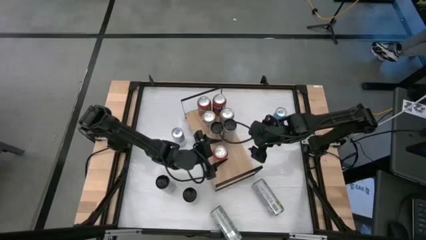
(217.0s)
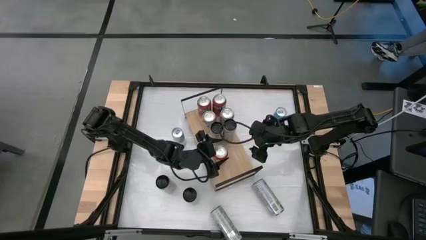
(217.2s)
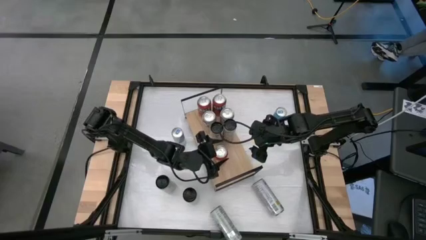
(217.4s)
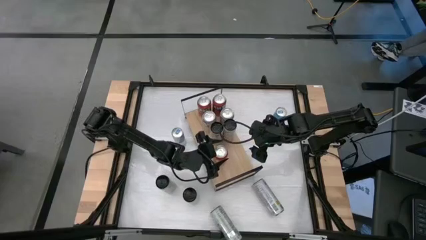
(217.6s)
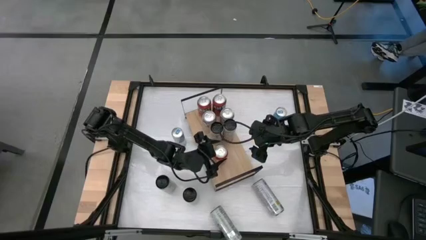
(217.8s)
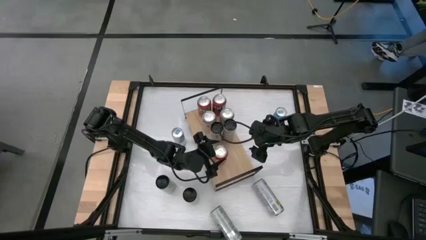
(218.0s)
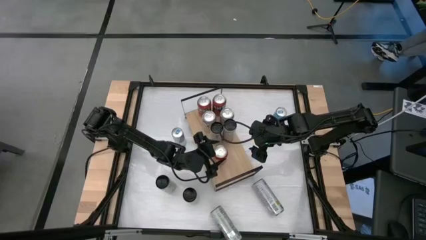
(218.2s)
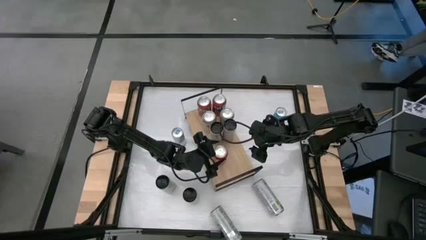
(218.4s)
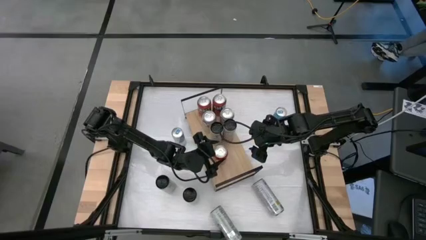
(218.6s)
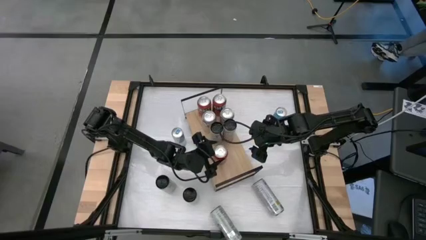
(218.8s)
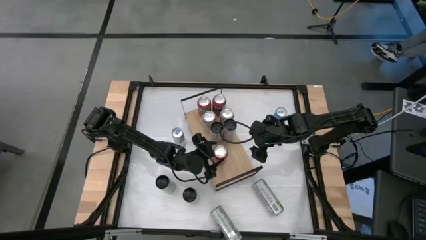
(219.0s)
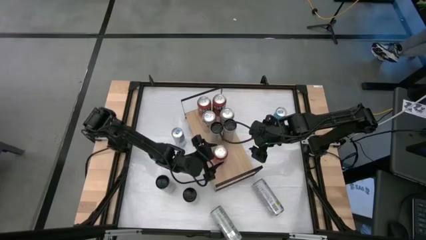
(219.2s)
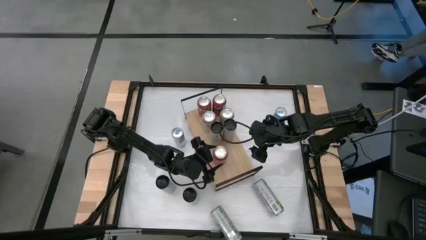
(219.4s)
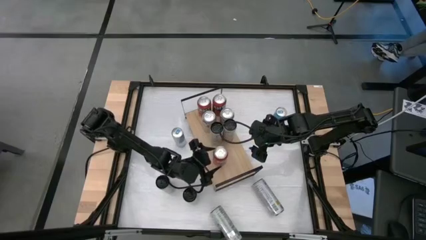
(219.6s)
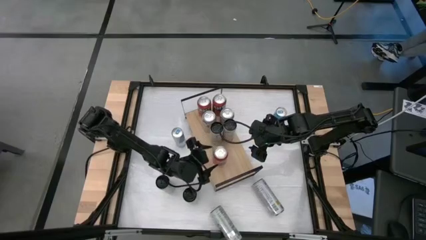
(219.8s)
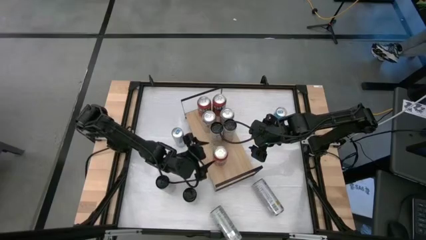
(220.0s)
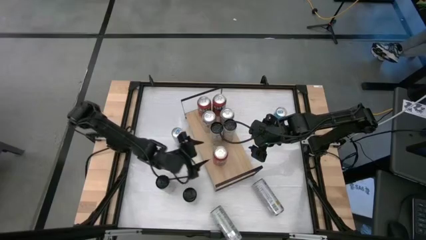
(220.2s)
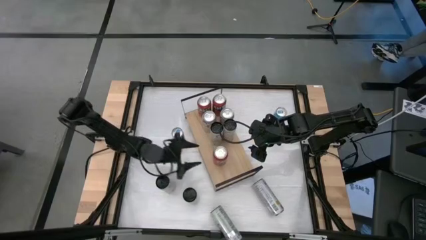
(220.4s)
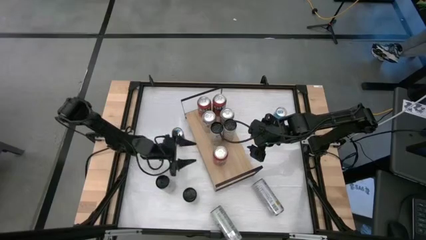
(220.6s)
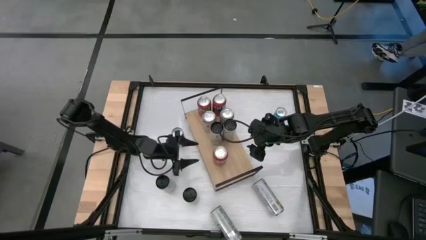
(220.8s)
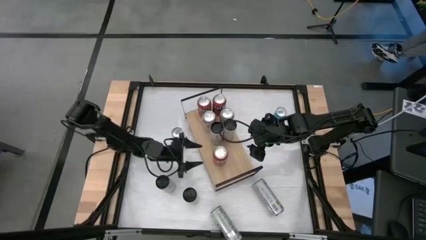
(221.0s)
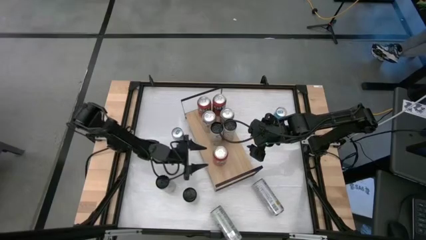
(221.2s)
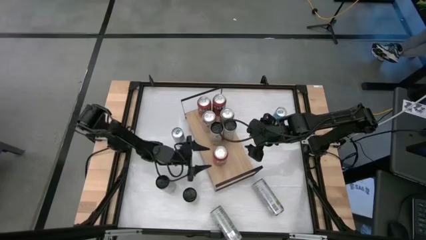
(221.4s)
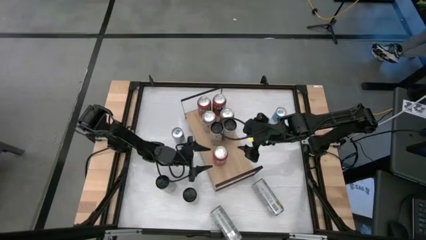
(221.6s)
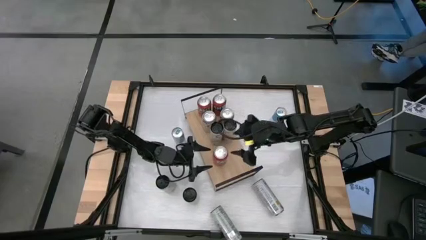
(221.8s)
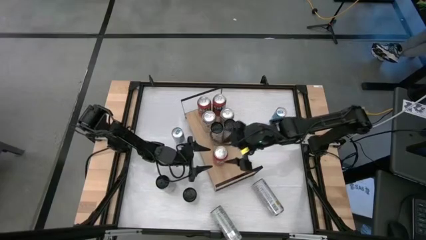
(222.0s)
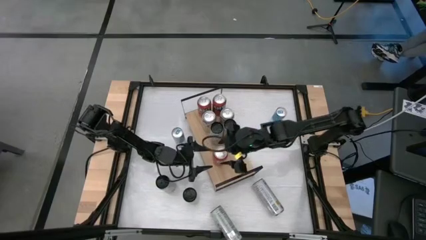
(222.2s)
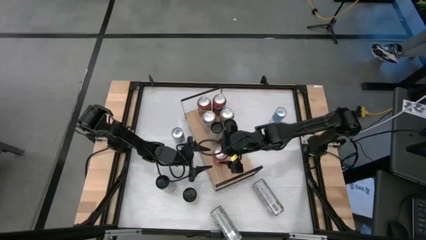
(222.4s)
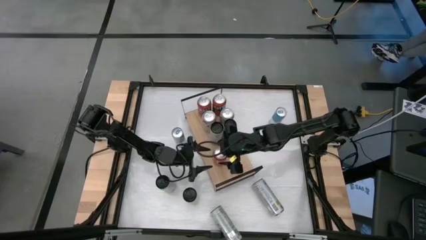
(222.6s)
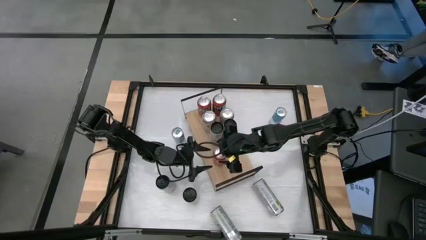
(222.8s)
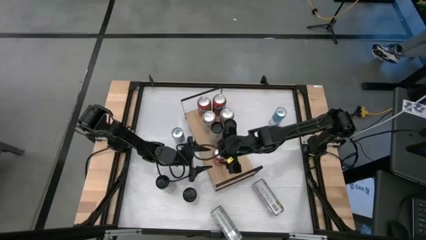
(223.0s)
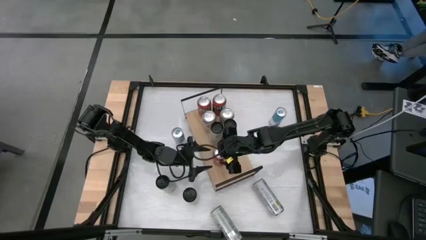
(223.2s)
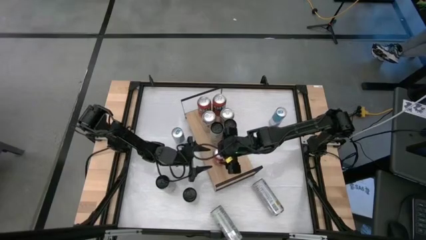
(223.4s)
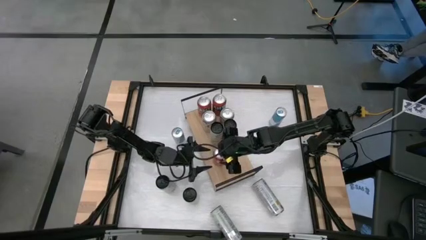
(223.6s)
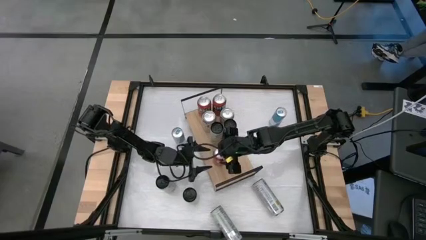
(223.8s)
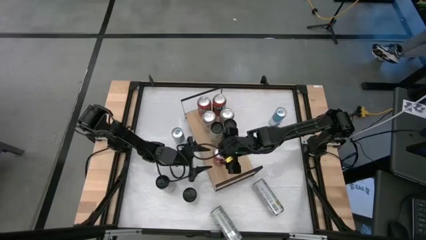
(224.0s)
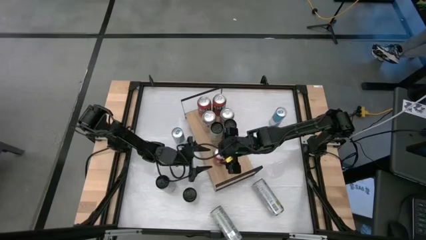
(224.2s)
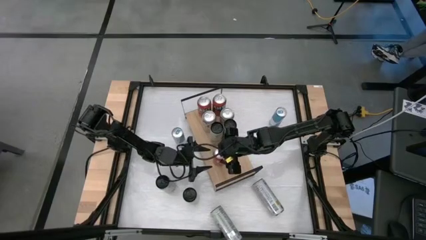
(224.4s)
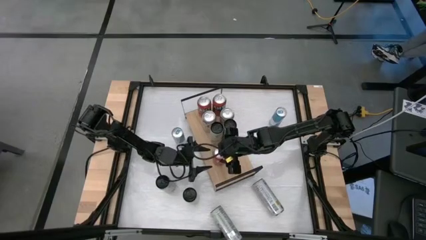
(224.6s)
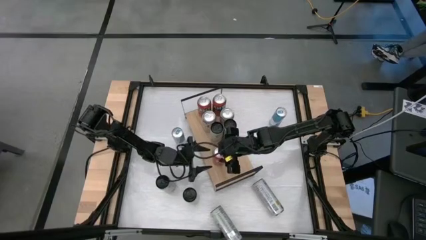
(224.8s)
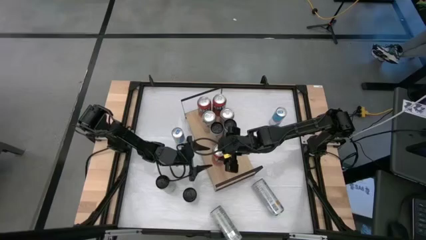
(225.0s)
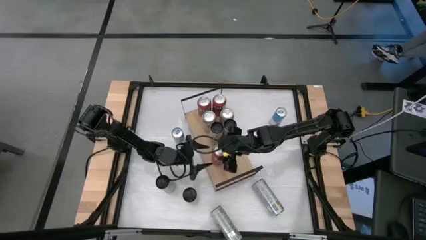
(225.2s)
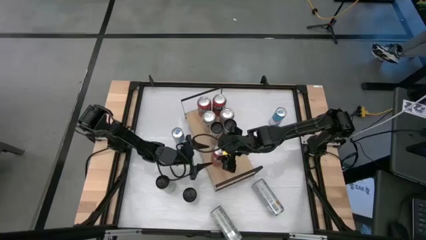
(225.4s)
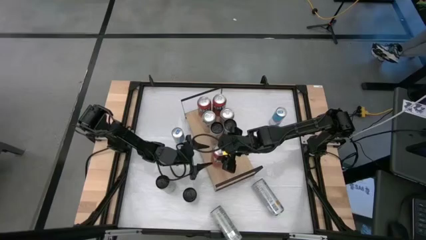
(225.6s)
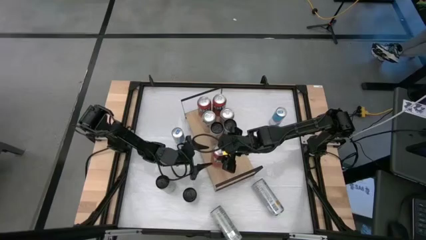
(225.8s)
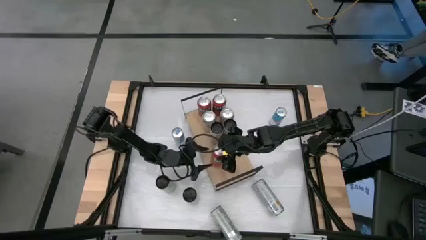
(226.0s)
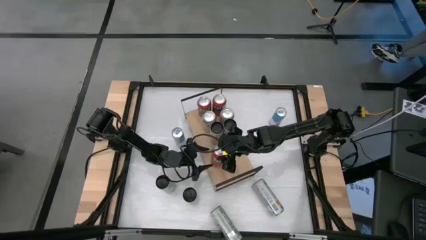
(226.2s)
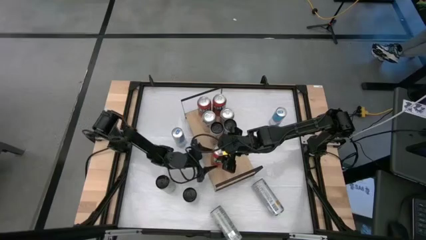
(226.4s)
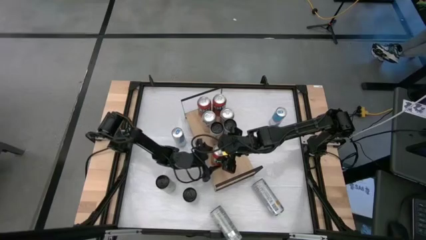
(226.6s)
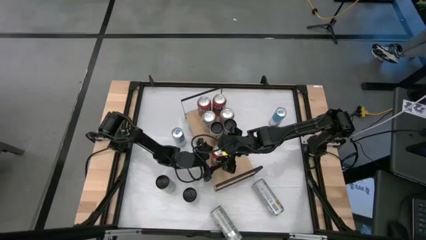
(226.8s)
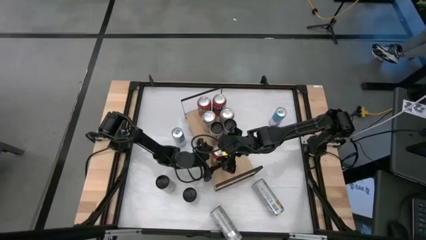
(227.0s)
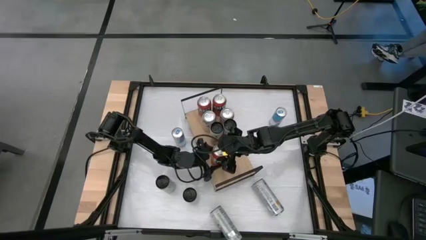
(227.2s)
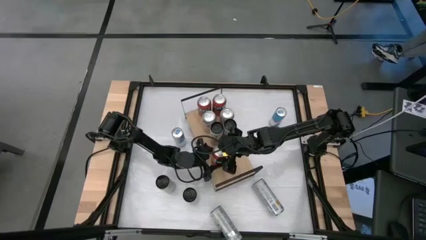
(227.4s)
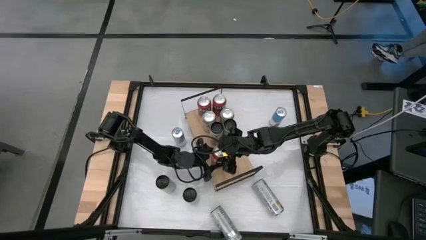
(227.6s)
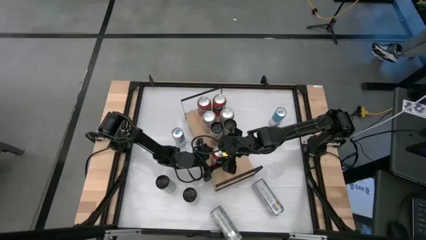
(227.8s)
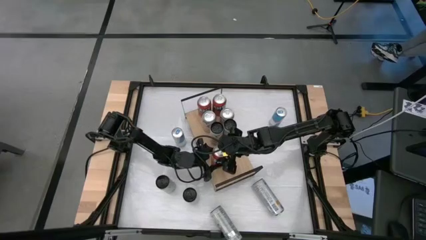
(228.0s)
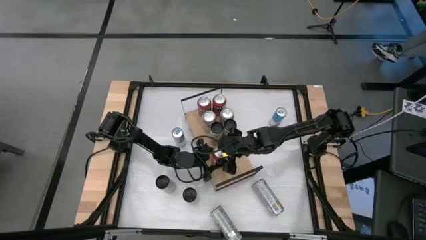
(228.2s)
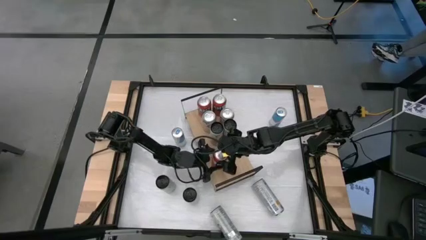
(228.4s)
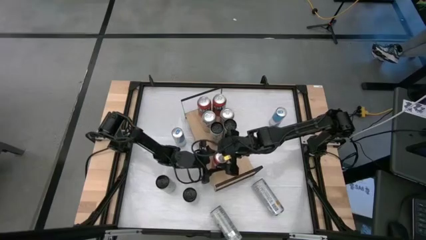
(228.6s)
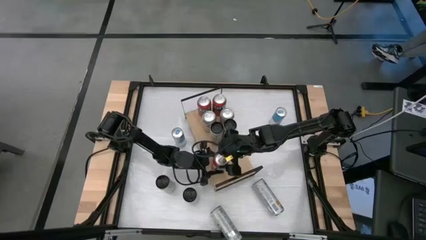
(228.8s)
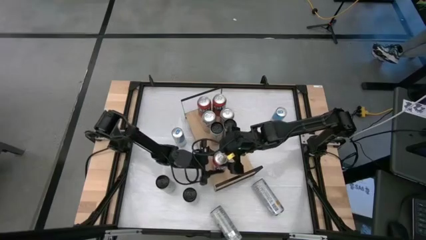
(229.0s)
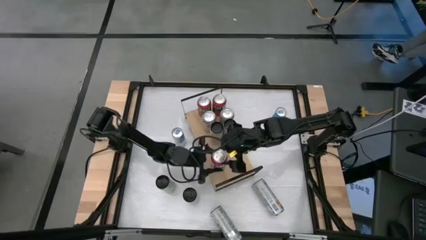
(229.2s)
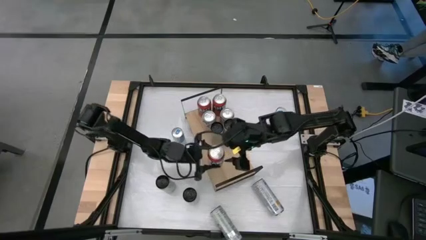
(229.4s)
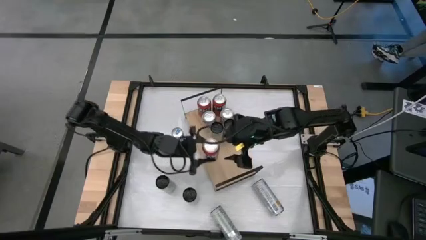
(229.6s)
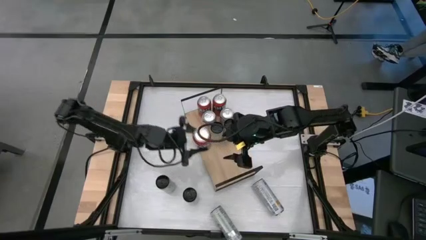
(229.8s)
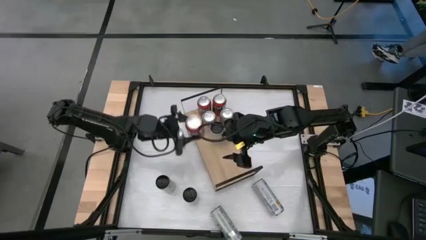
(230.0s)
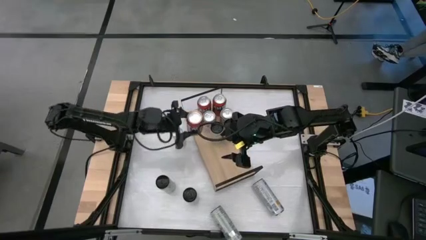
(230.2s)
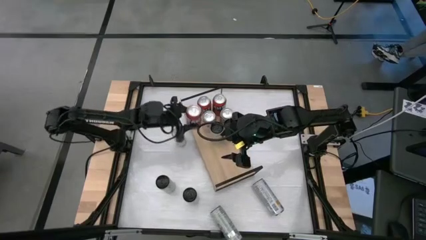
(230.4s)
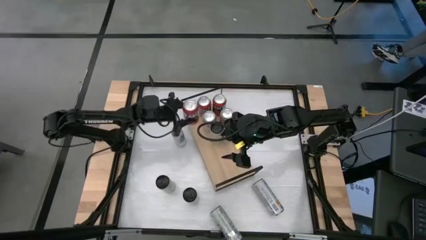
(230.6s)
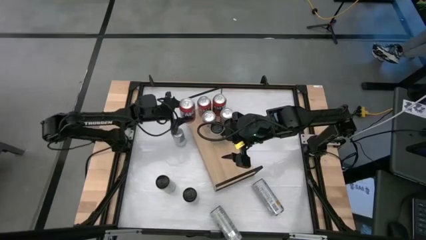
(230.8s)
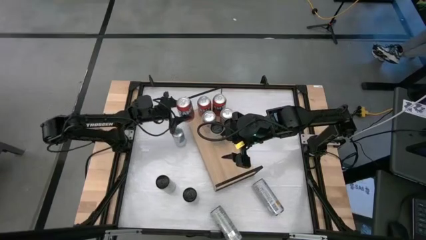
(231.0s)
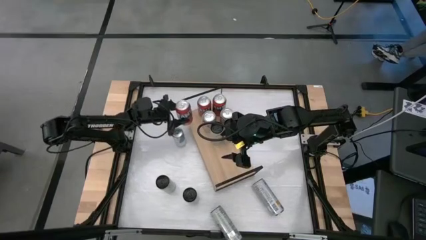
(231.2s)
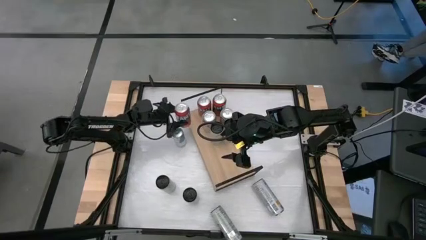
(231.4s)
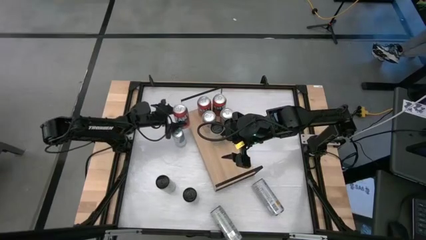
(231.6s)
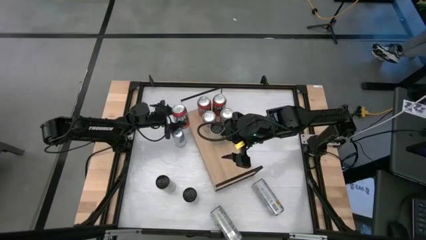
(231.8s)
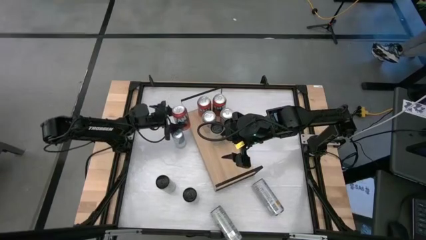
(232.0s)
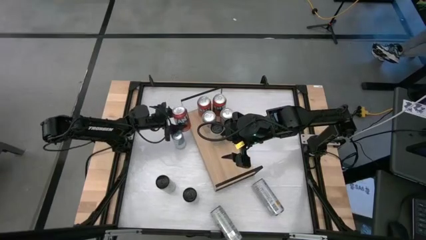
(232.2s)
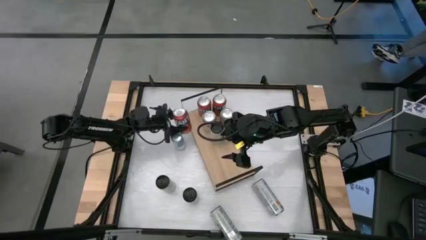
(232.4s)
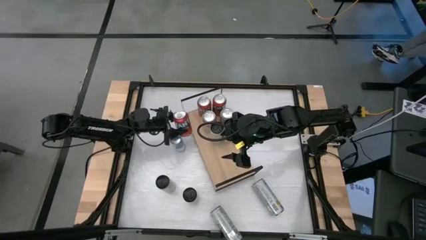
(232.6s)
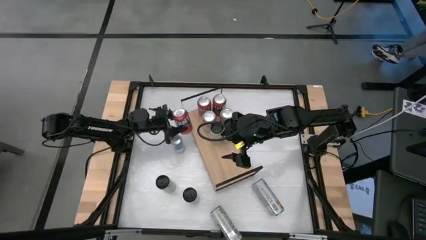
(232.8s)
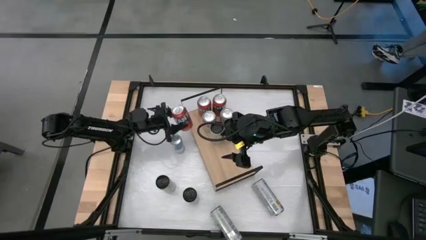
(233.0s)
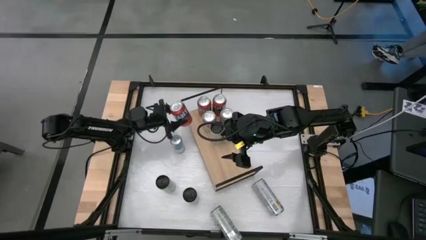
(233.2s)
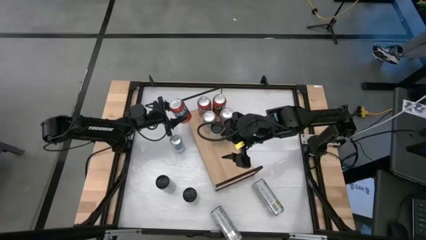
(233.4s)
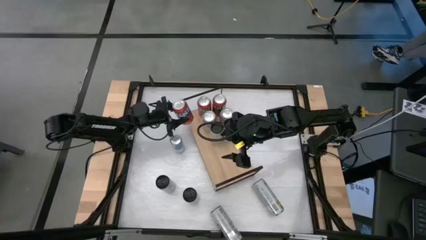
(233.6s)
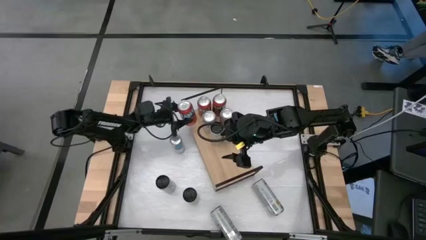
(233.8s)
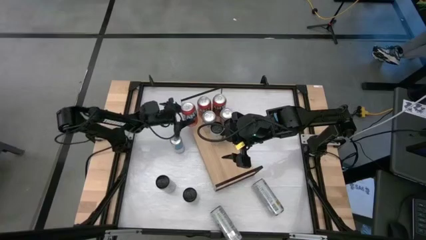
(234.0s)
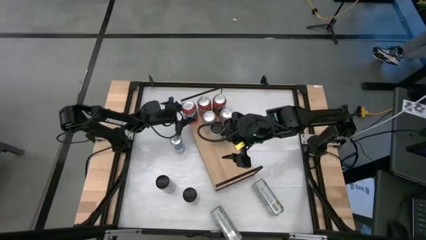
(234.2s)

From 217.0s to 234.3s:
Task: Place canned beverage on shelf
Align the orange soda can with the other orange soda can
